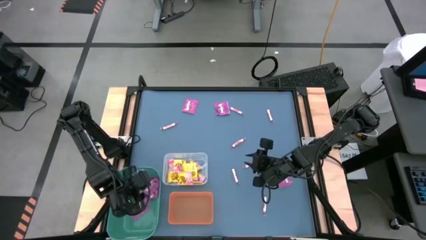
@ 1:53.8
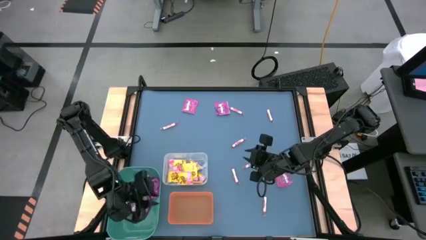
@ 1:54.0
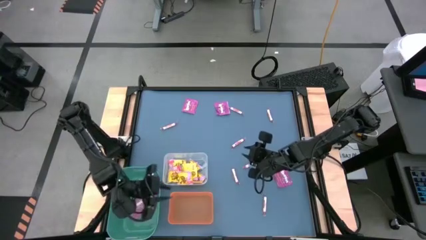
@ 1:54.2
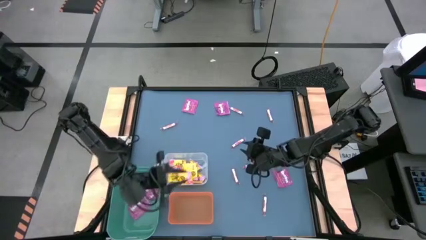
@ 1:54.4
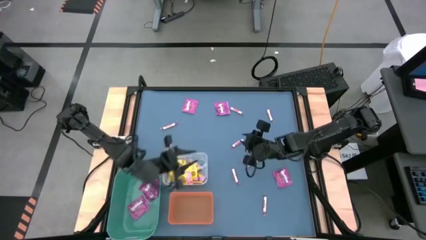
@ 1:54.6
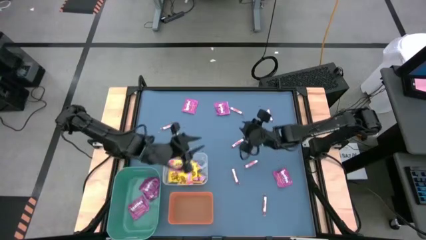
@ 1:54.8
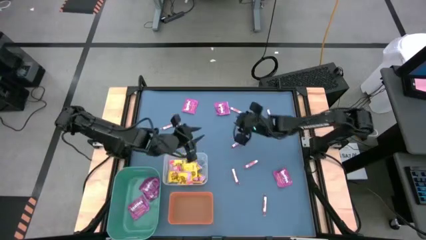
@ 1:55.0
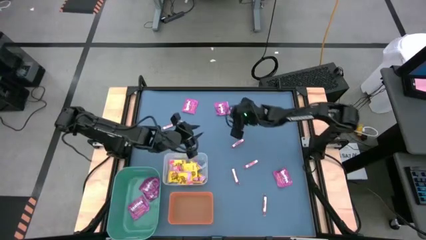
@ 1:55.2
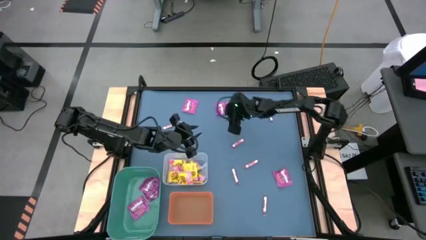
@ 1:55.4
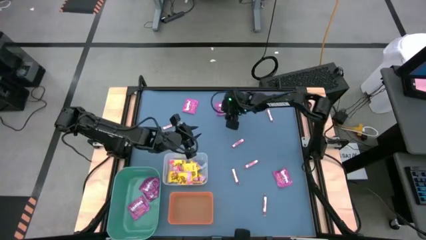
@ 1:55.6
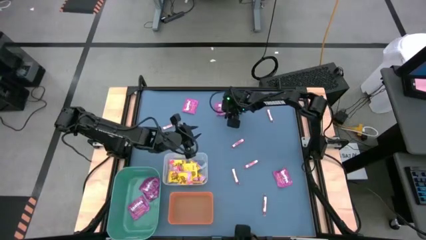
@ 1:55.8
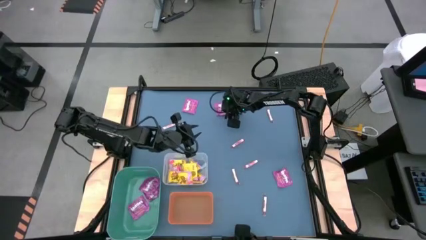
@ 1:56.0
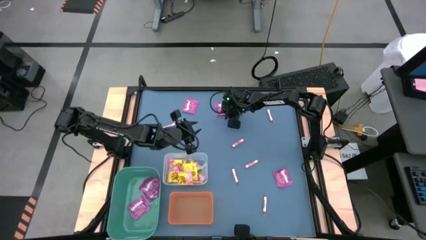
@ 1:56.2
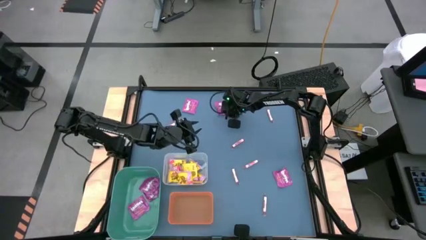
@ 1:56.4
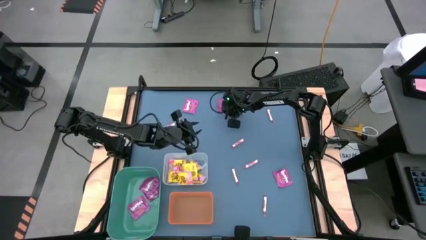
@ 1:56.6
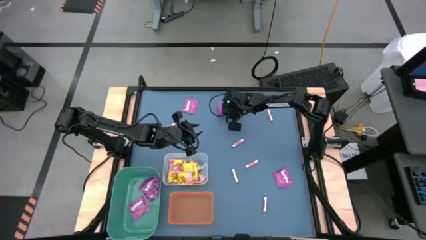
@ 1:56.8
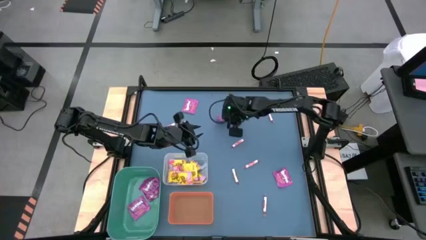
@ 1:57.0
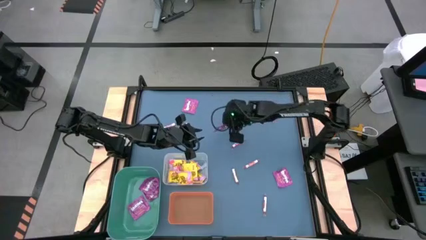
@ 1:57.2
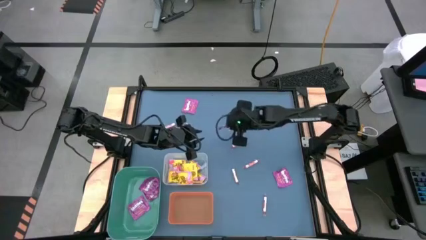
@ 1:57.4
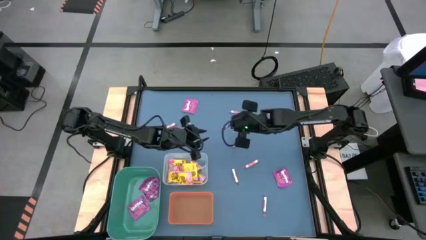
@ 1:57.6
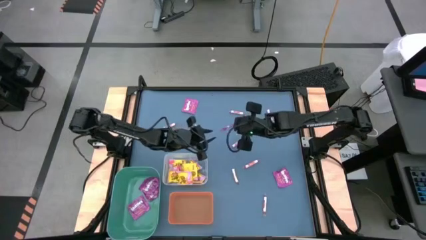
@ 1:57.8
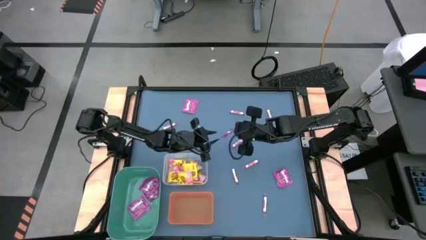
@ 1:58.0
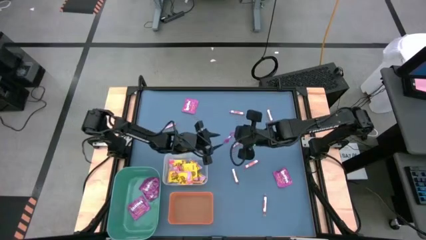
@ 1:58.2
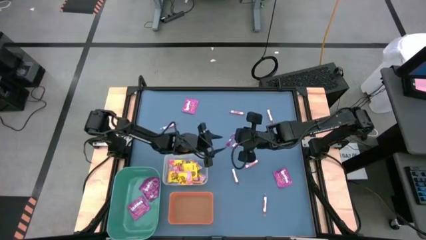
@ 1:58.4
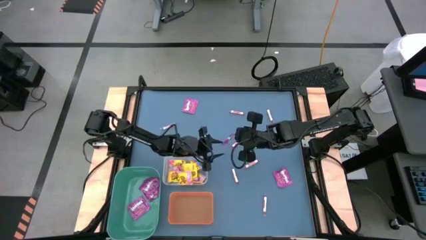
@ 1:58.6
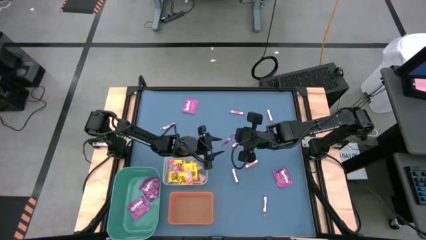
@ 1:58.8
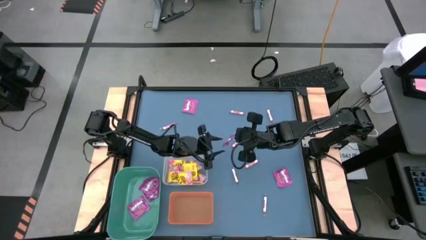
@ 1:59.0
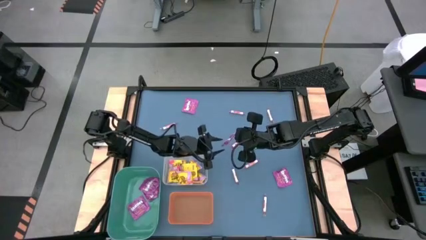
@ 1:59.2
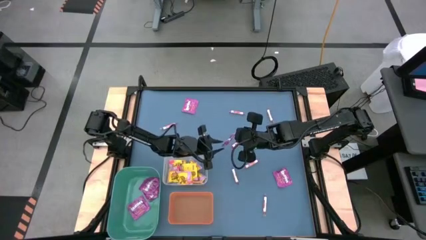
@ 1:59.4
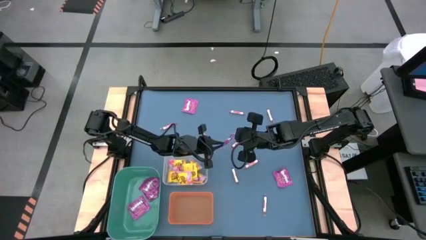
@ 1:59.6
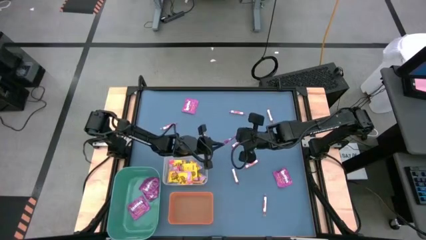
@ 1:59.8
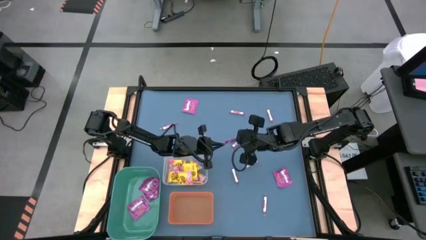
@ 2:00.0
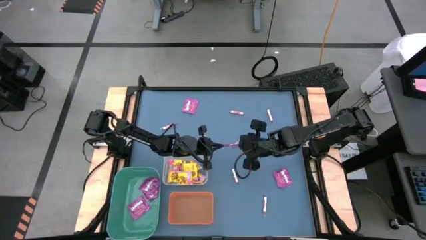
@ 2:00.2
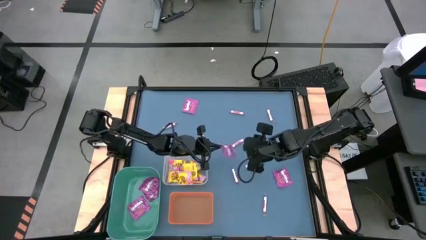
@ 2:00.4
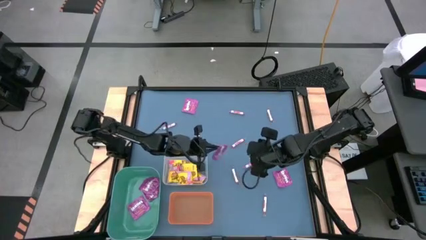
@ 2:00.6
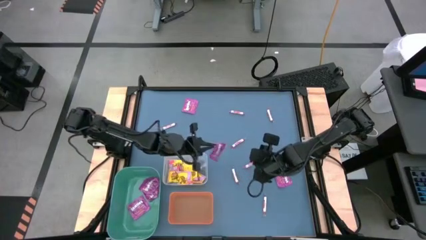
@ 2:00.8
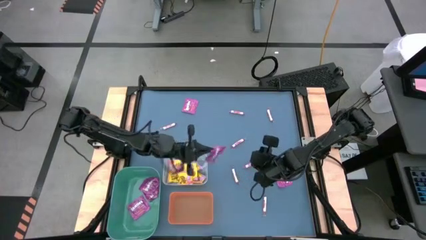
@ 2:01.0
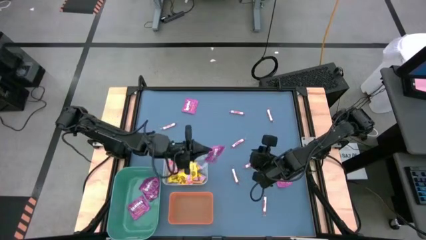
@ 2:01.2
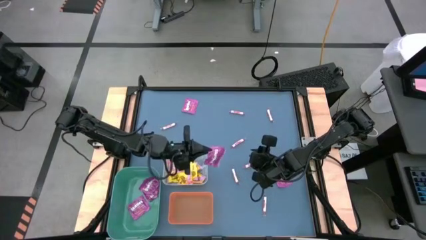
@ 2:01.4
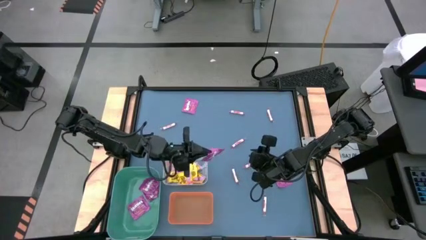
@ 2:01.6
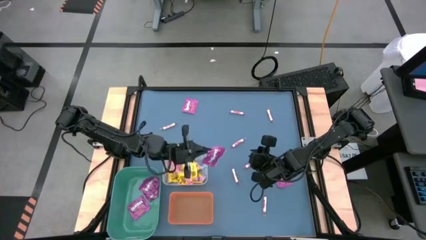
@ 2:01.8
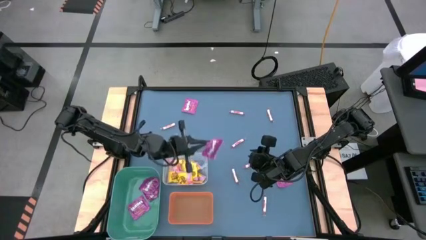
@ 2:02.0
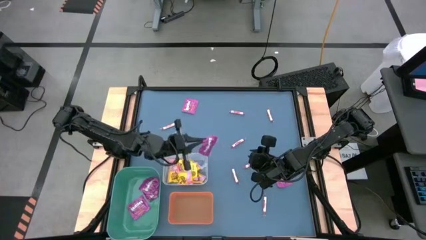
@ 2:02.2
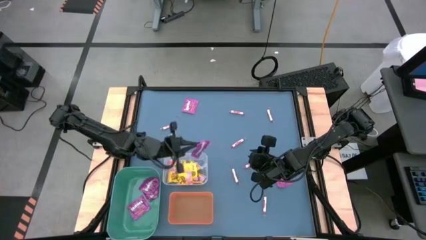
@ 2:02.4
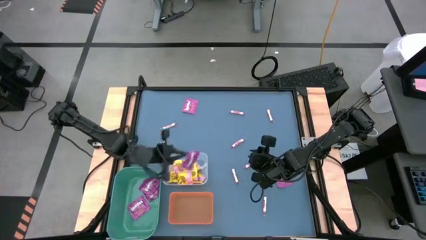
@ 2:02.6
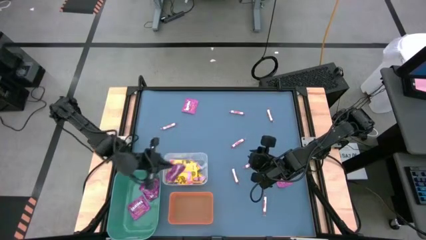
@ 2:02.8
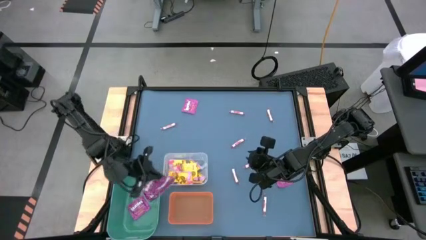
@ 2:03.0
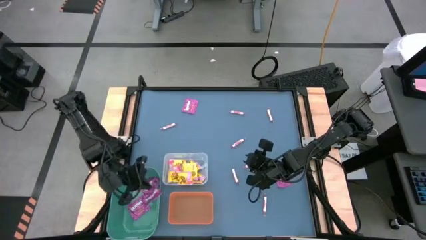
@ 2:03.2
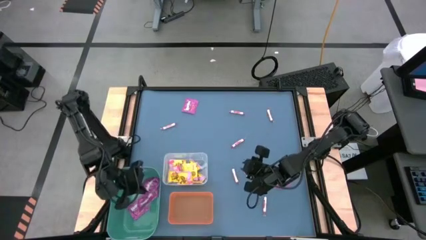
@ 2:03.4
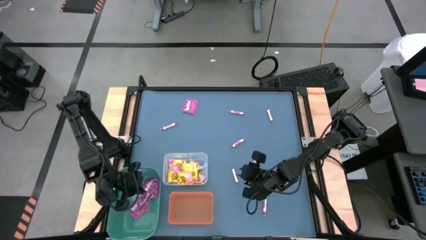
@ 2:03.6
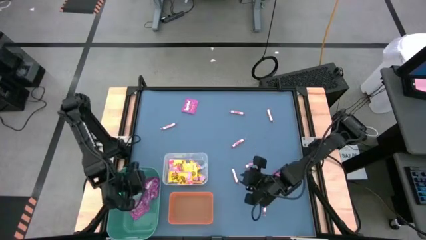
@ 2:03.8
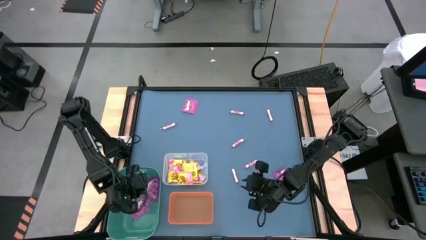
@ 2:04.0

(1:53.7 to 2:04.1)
Task: Sort candy
Put the purple candy into the green bin
